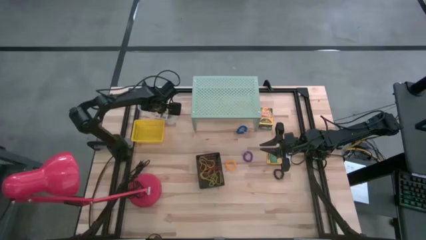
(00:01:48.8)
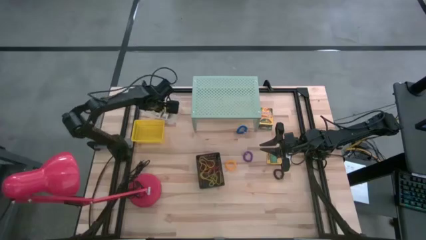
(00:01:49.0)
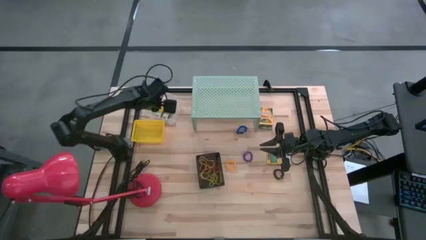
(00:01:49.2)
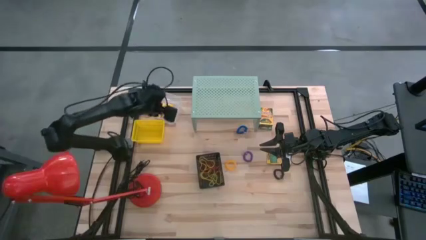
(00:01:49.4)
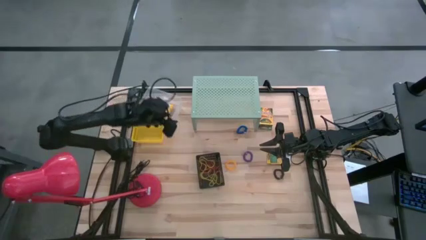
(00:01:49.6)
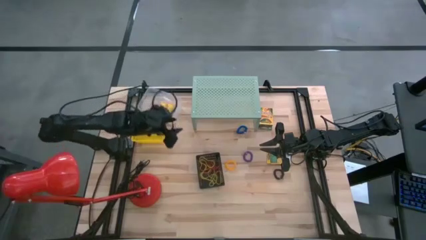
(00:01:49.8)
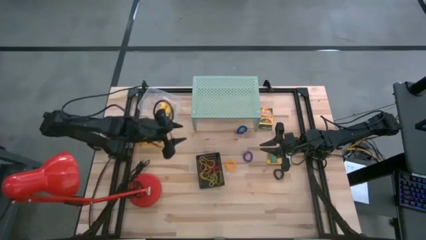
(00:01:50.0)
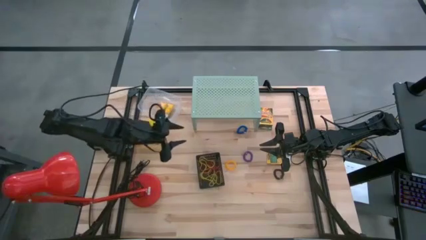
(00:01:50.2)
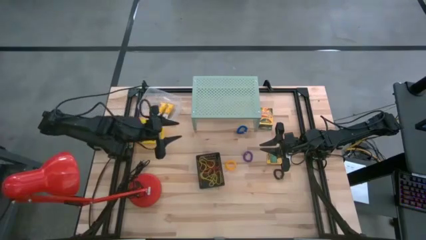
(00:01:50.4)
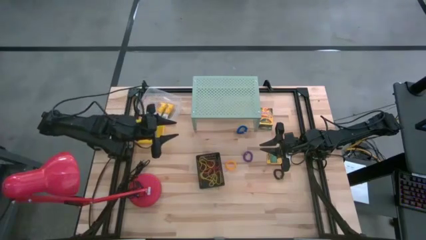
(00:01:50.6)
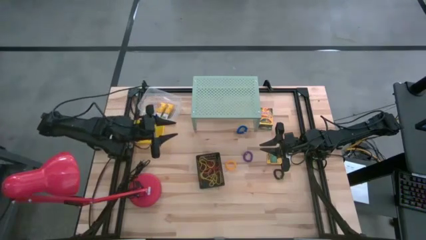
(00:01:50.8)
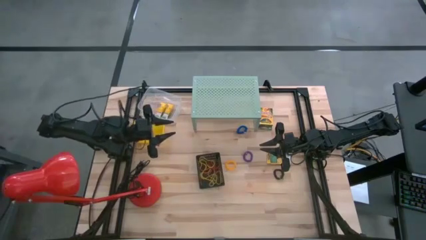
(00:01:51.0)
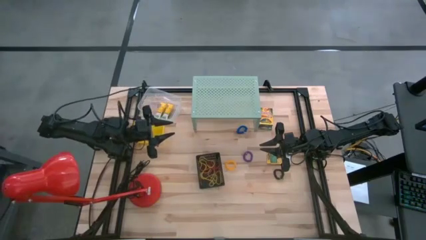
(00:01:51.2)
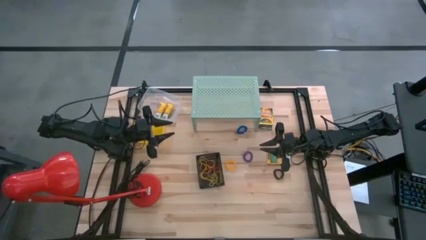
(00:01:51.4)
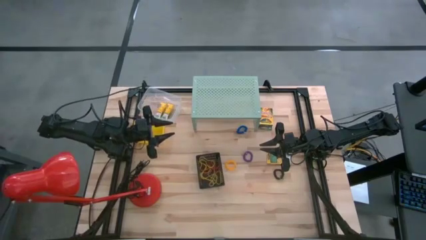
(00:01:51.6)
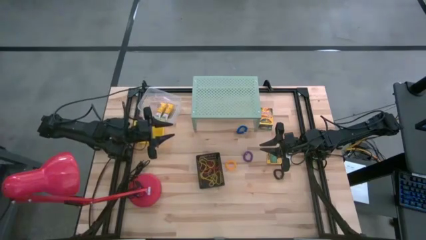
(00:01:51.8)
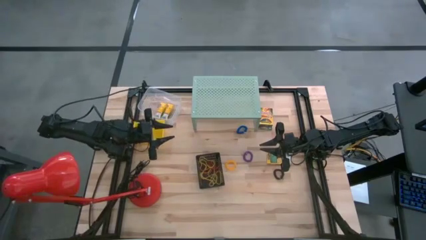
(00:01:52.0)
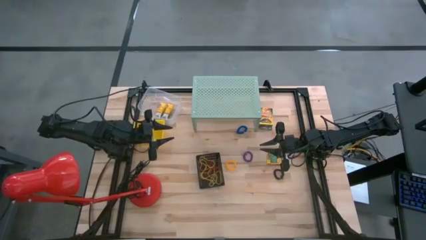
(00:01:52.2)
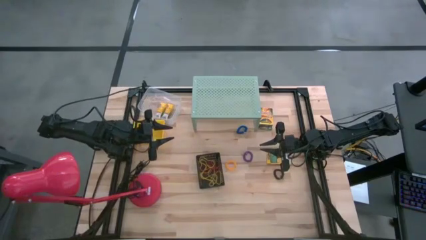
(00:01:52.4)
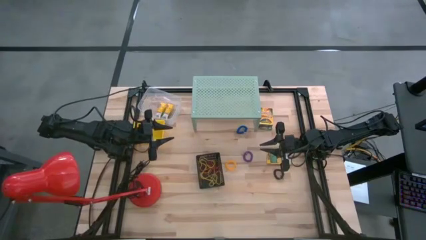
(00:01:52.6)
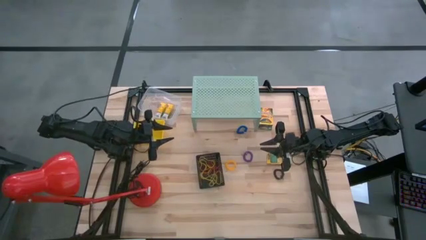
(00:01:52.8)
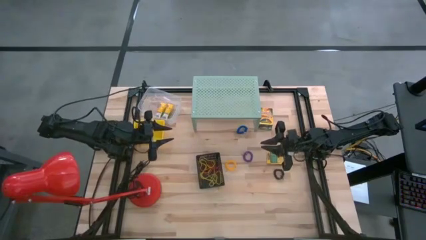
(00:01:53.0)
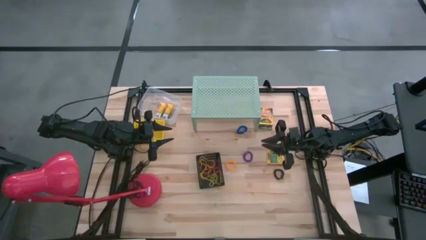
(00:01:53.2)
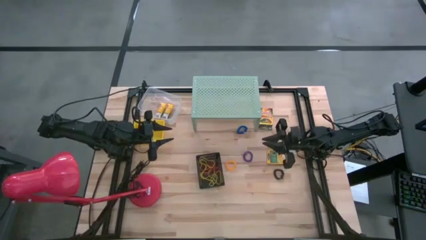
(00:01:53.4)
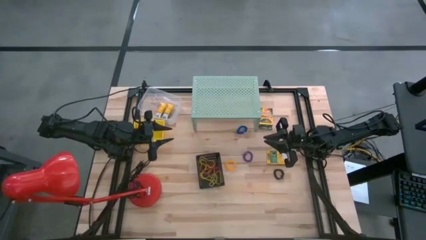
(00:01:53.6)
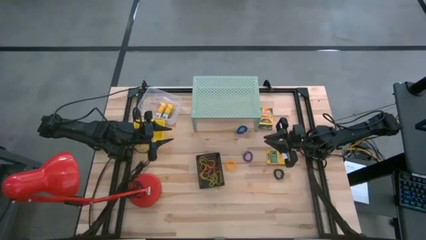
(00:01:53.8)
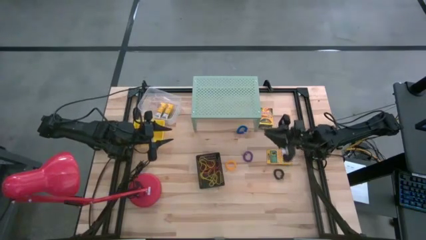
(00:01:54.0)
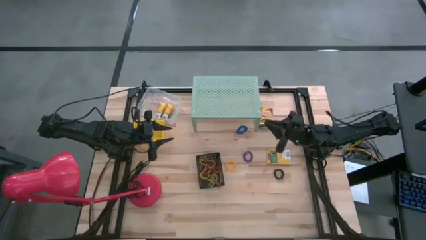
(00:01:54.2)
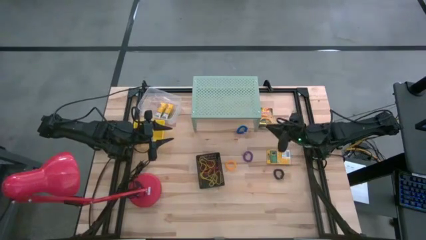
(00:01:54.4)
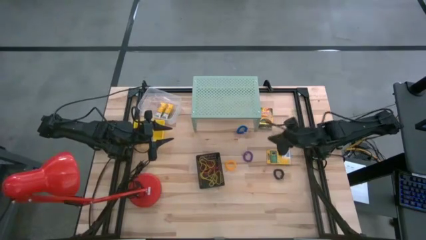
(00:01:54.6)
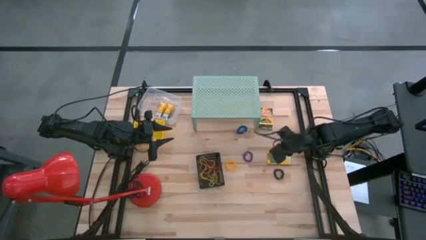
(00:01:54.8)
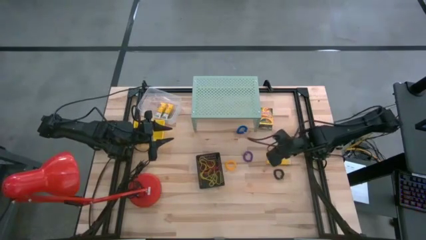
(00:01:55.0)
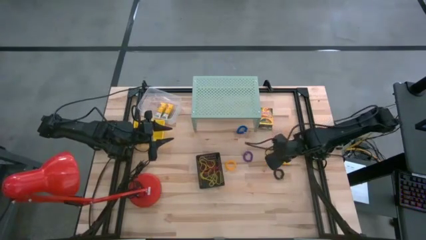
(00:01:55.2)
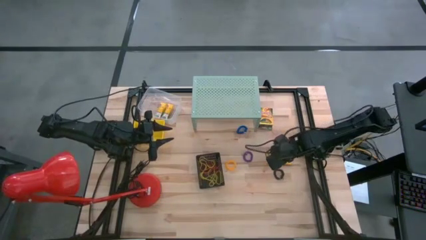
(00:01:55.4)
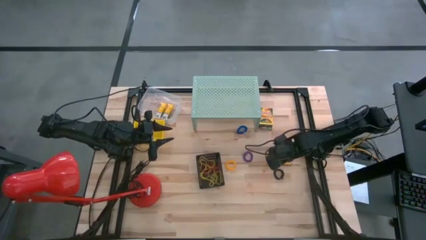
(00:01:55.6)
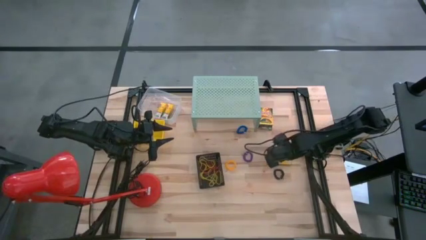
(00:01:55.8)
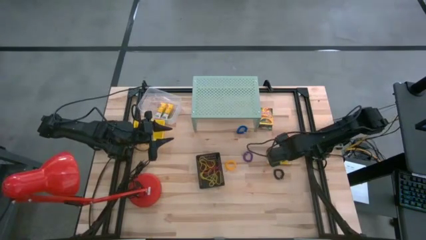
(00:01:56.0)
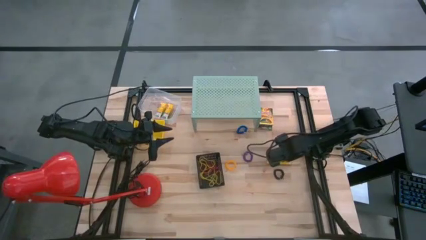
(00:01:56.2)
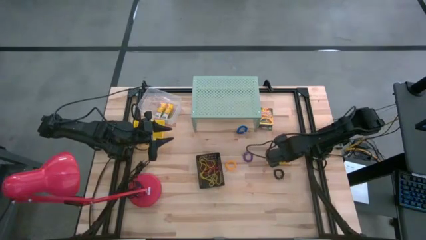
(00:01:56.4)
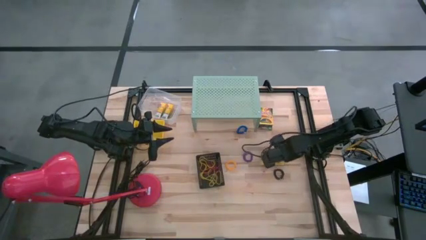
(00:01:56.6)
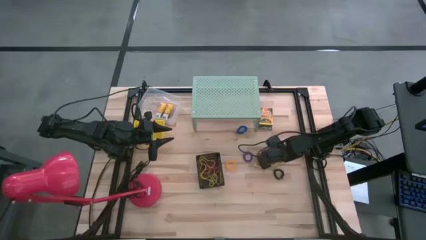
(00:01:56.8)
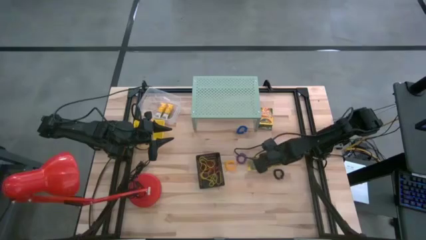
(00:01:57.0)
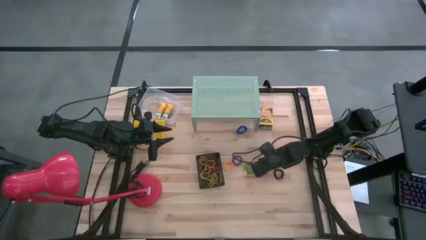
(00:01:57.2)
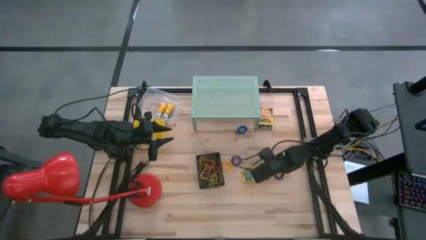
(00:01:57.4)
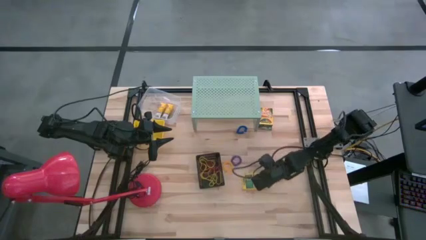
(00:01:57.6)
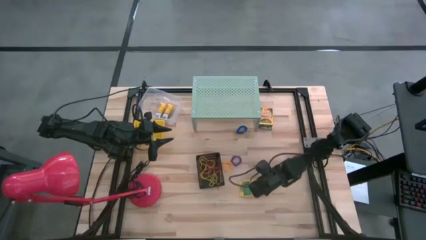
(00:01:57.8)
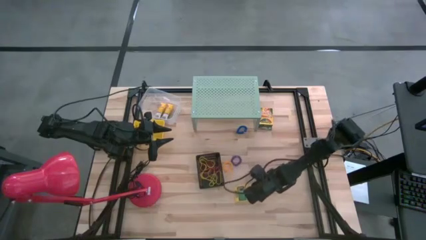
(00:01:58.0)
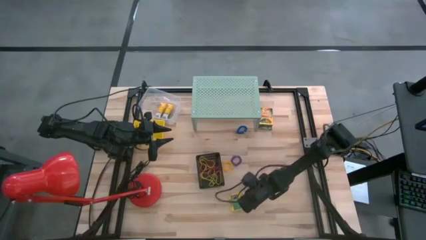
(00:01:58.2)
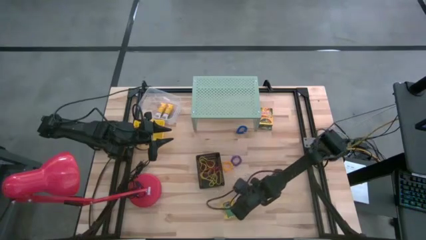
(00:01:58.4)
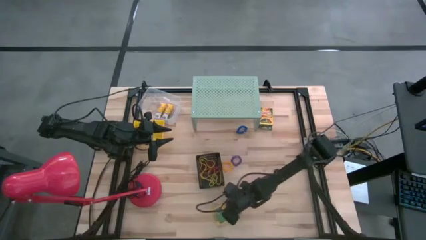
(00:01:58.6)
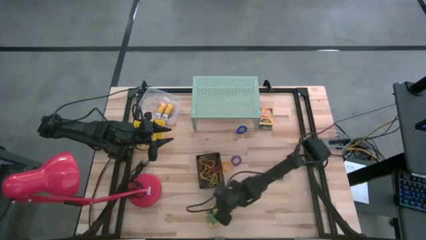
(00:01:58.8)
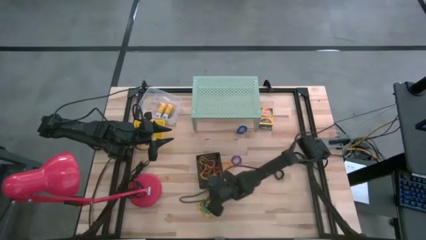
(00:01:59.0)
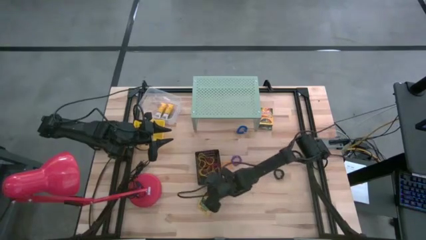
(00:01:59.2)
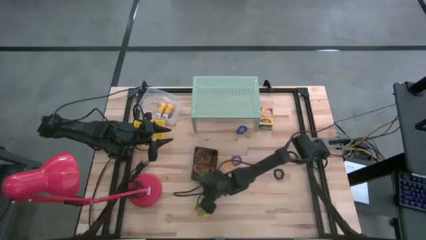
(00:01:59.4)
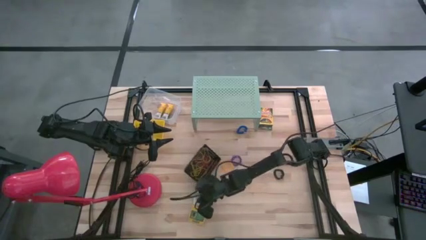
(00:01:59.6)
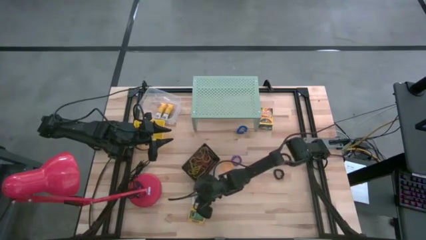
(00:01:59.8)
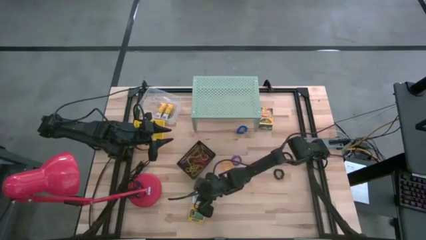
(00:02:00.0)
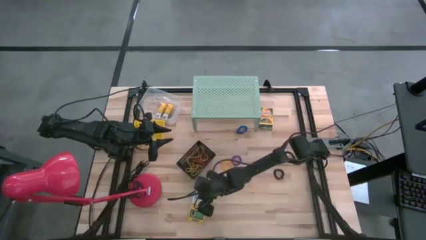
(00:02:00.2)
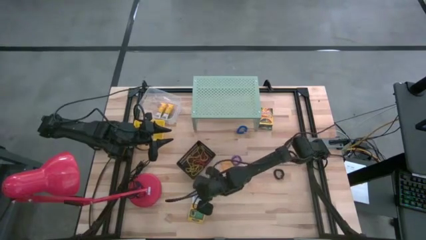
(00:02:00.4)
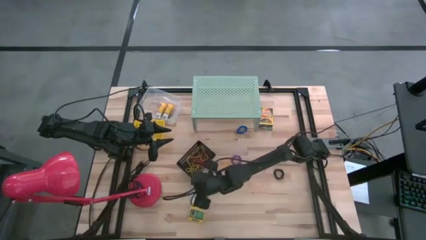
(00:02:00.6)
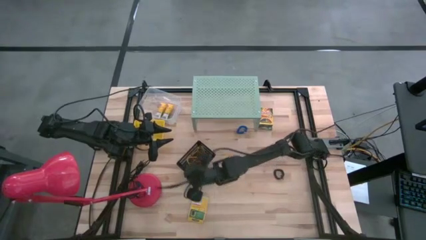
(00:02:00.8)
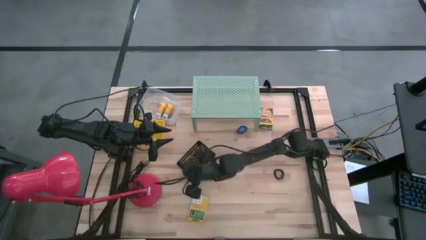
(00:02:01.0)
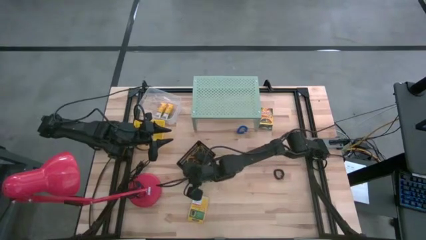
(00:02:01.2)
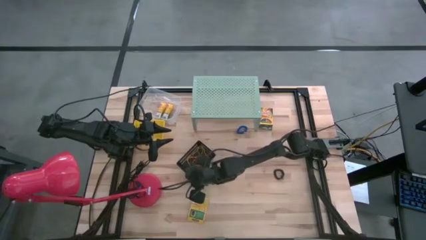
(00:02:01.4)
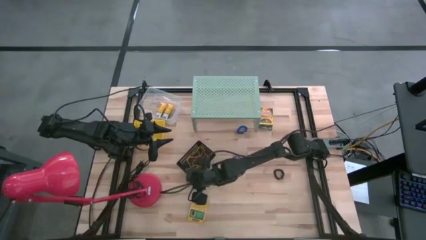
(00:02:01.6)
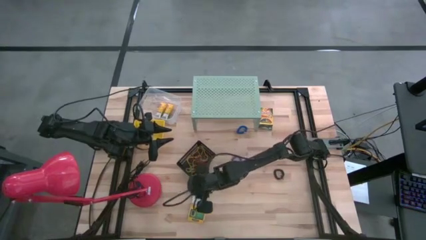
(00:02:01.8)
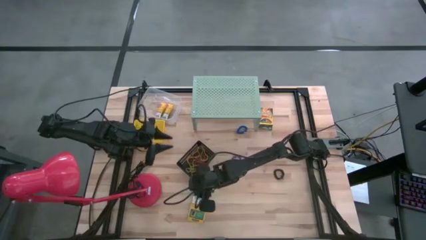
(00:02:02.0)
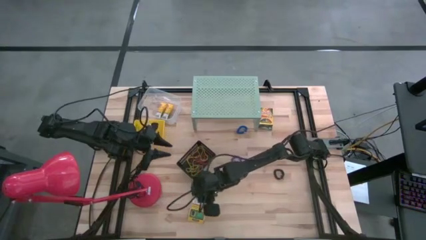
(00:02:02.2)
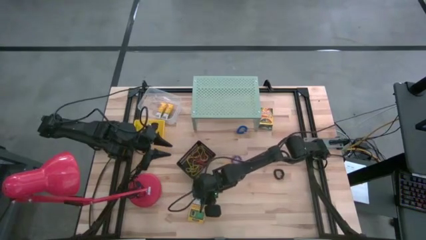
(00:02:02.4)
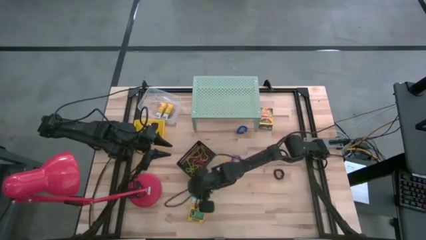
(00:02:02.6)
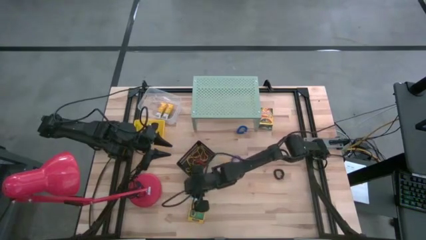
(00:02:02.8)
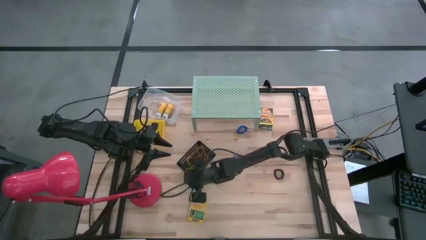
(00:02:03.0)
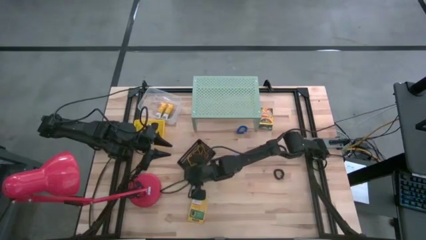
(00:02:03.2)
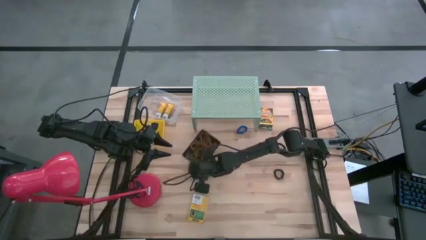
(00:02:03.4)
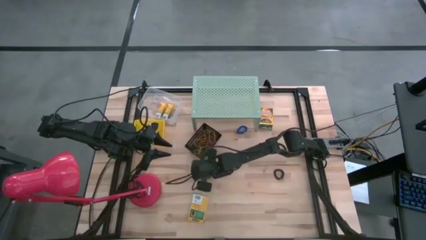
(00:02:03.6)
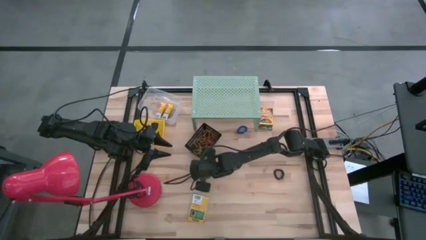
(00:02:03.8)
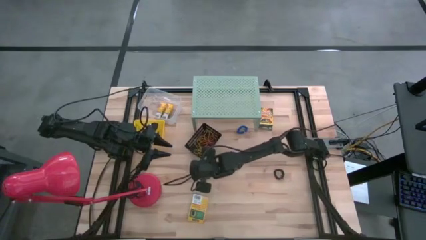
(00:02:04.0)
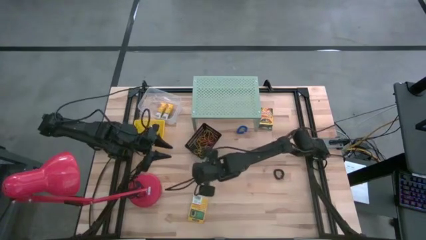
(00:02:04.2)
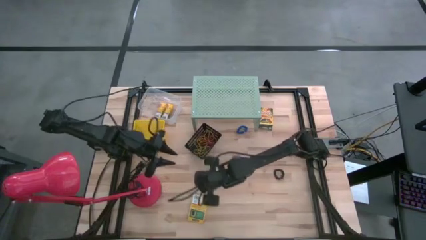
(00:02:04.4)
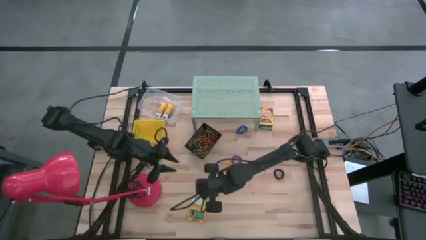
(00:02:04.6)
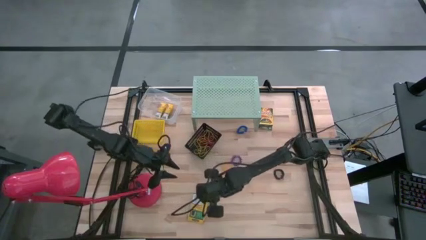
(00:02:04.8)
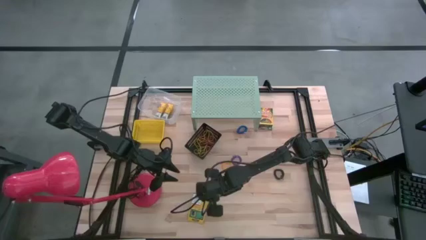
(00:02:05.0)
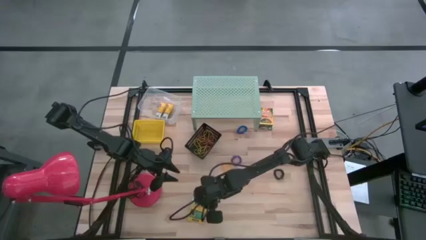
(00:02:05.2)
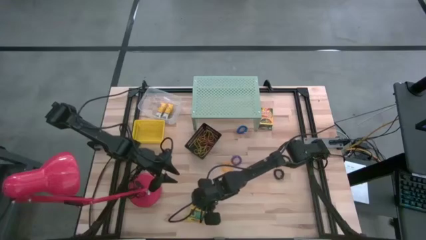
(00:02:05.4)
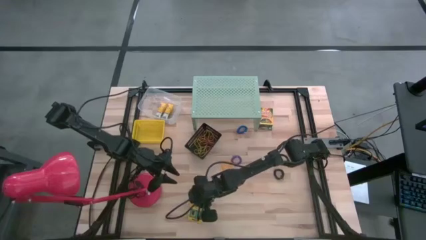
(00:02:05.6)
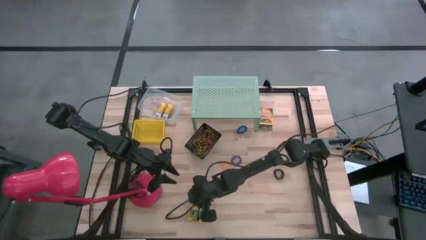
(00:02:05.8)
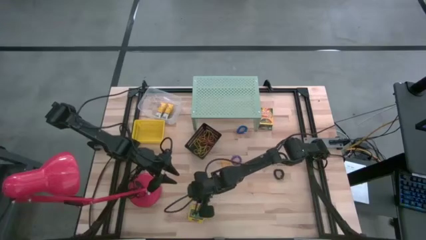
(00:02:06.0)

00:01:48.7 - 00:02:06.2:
Task: Pick & Place Office Desk Supplies
Put the bottom big crayon box into the transparent bin
